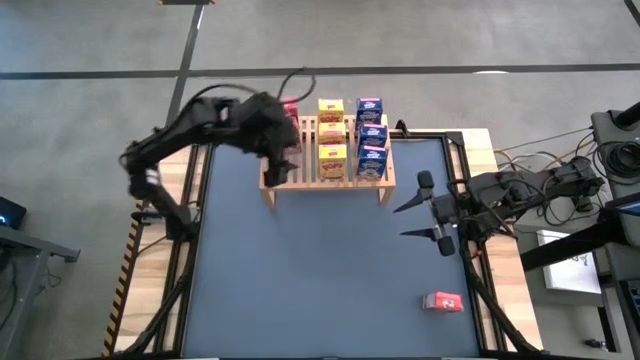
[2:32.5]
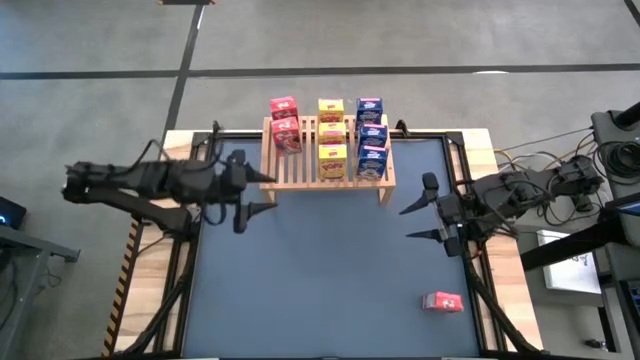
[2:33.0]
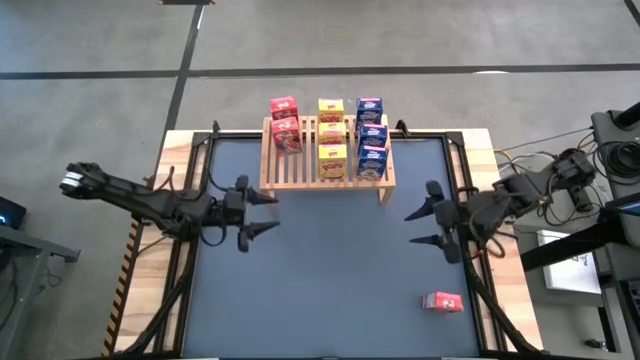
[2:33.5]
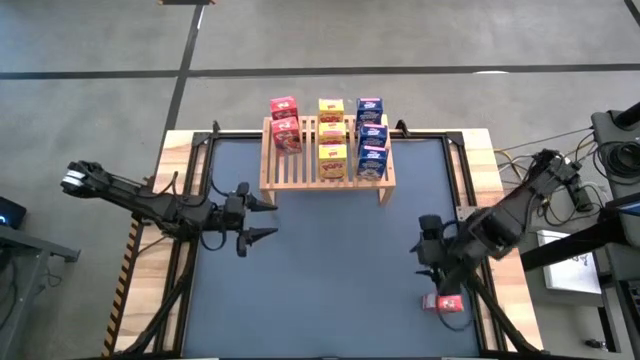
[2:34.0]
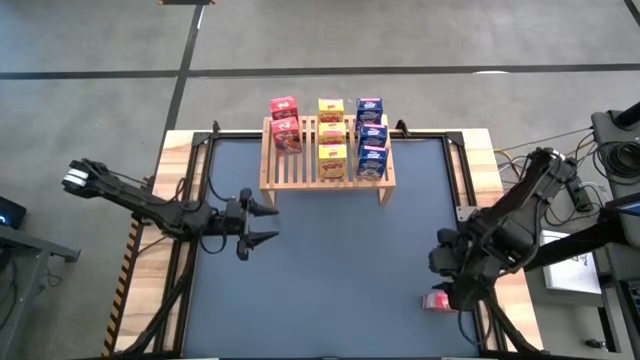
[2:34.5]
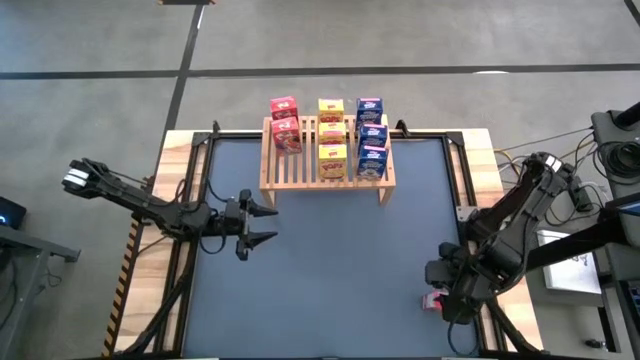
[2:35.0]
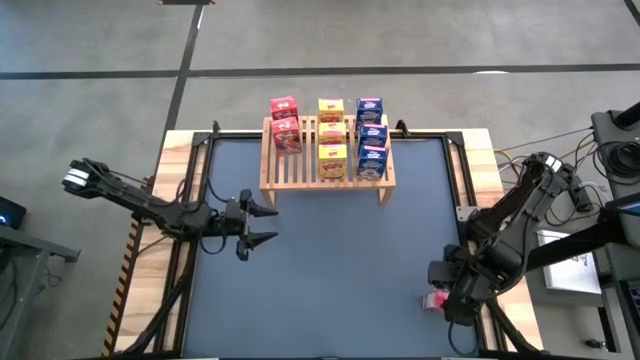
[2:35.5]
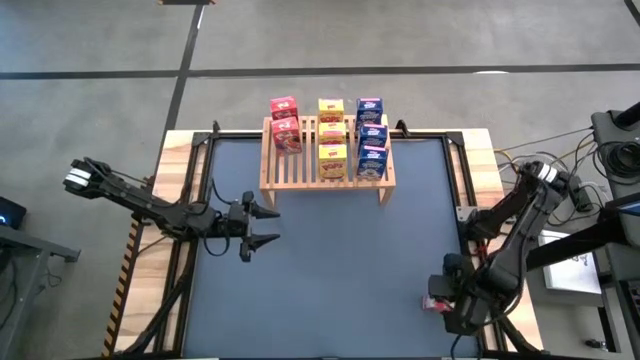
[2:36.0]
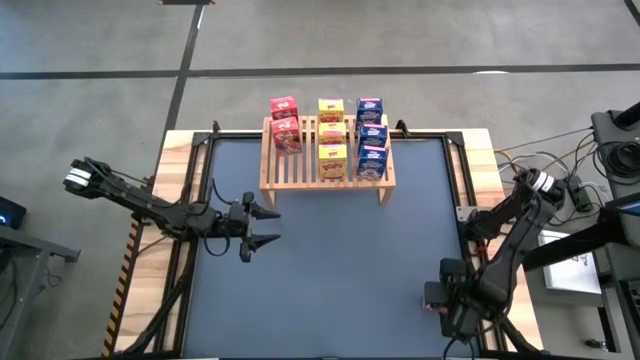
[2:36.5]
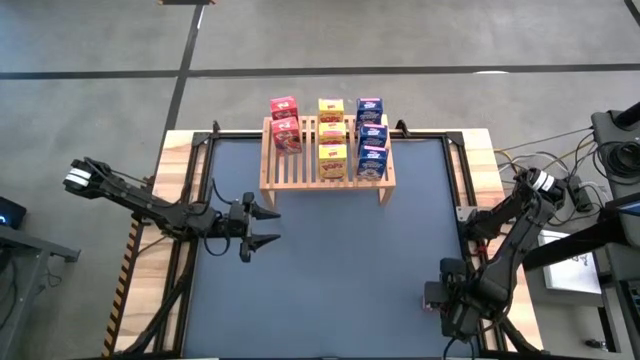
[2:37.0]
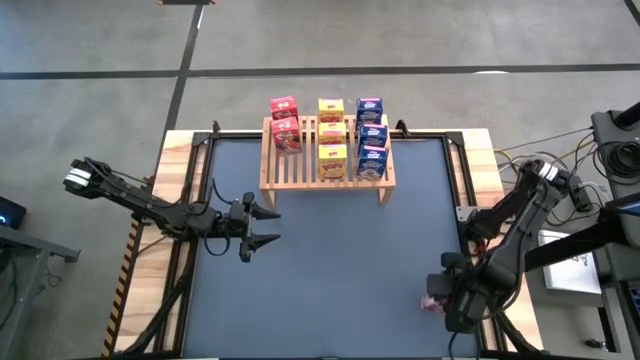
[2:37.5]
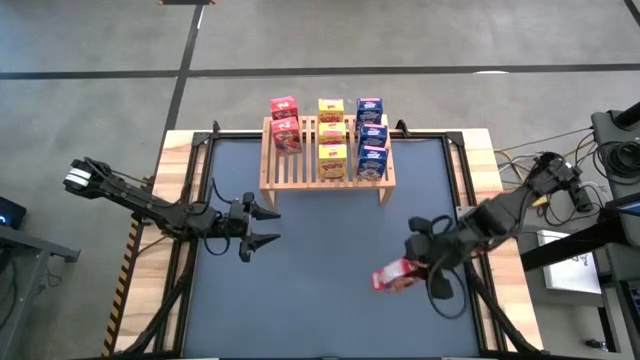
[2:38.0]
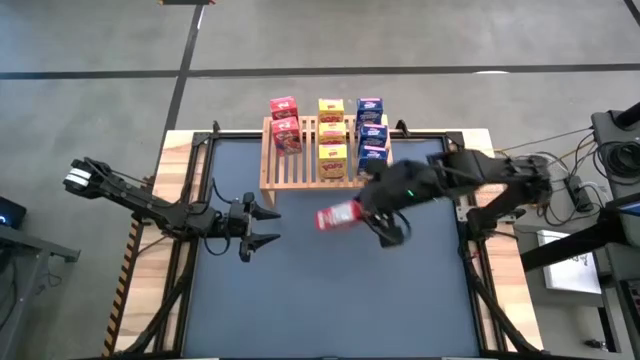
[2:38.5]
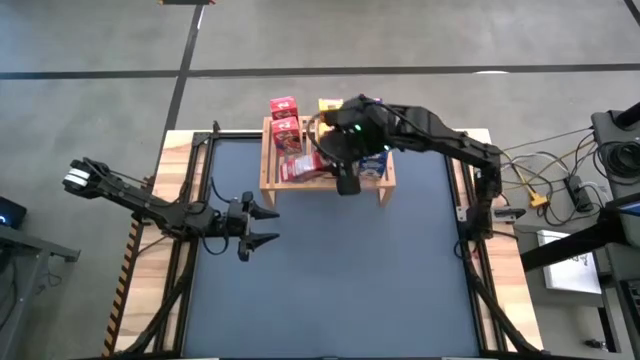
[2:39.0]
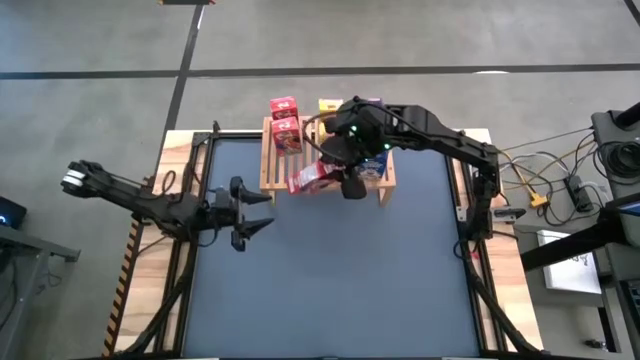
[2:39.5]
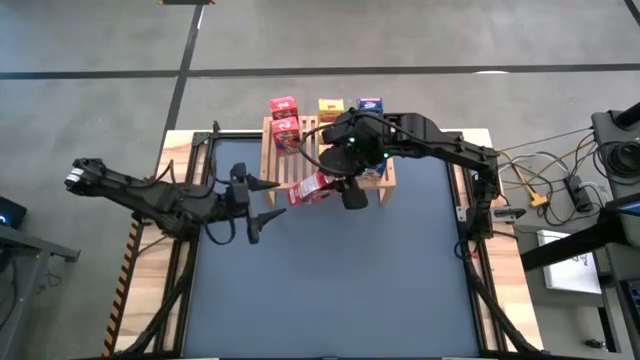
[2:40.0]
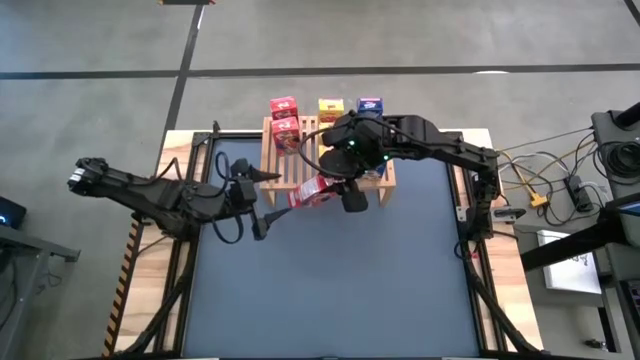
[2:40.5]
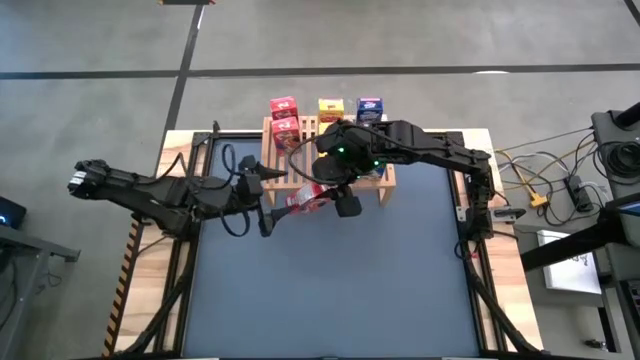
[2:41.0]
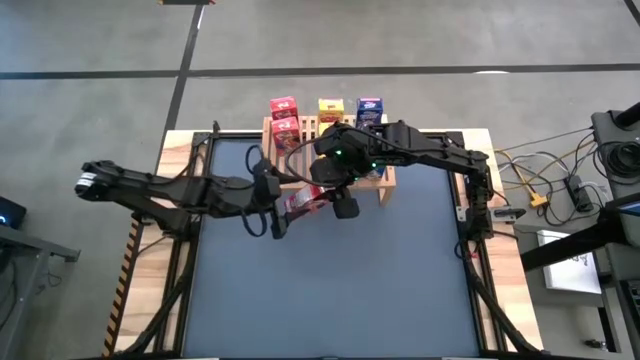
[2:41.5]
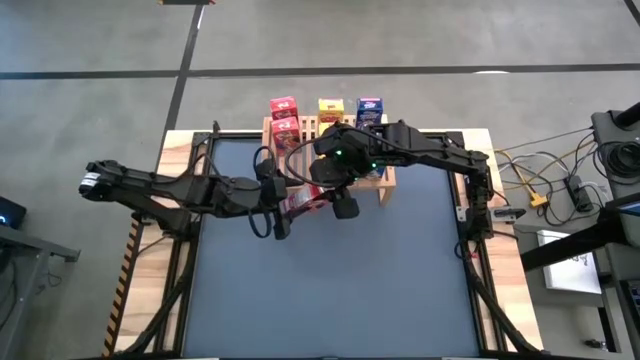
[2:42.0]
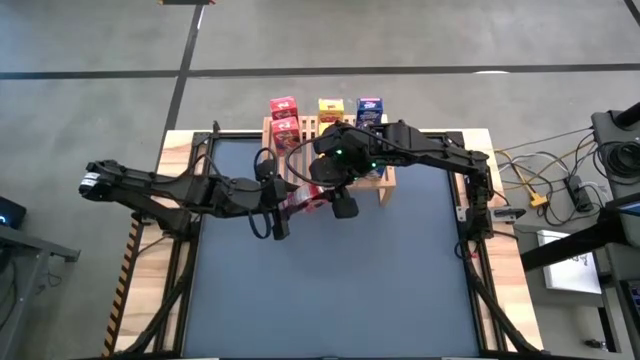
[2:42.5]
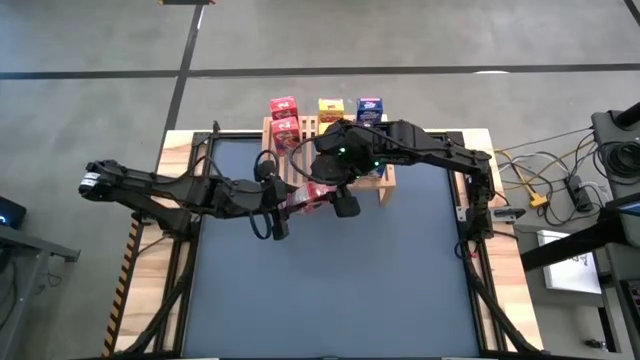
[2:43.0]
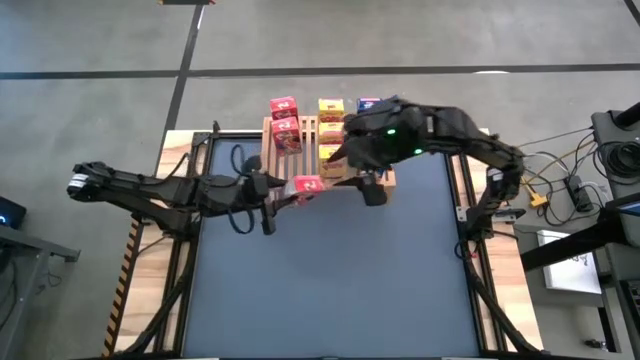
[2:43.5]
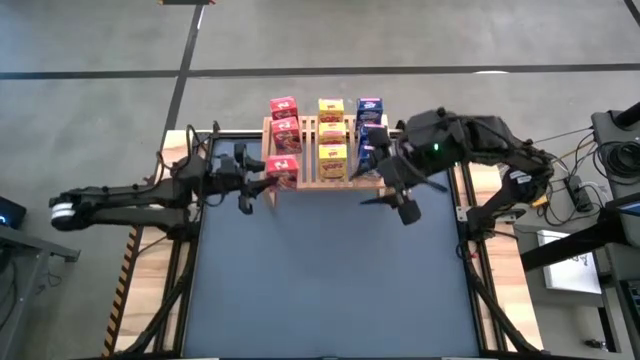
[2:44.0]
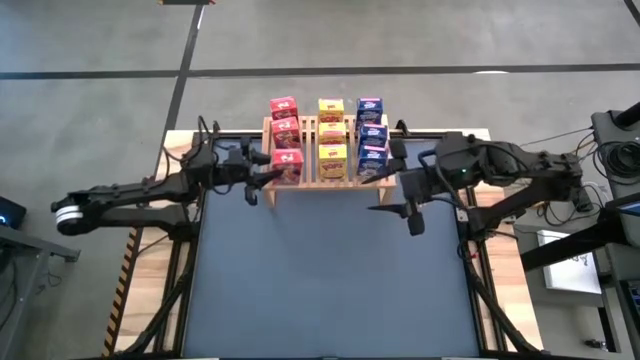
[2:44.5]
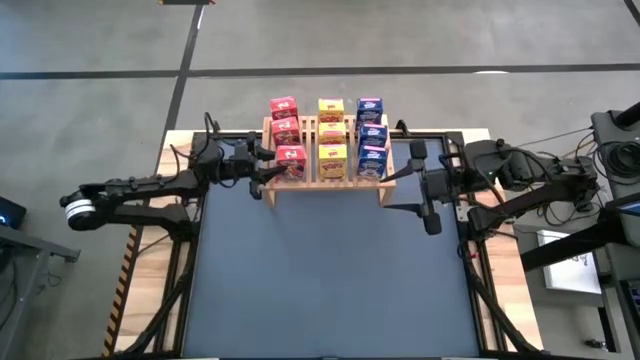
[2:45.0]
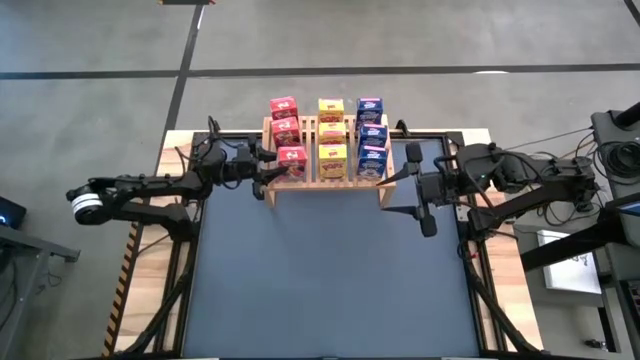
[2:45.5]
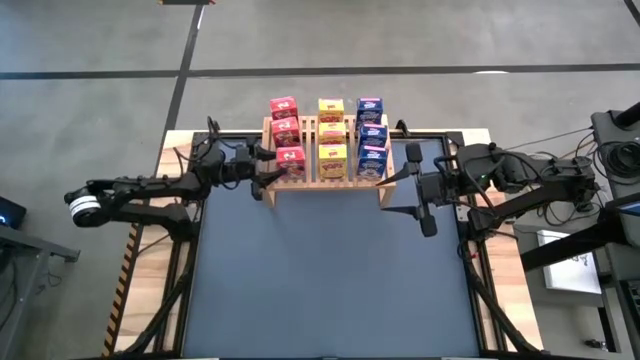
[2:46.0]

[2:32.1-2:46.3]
Task: Stack cereal on shelf
Put the red cereal box on the shelf aligned with the red cereal boxes

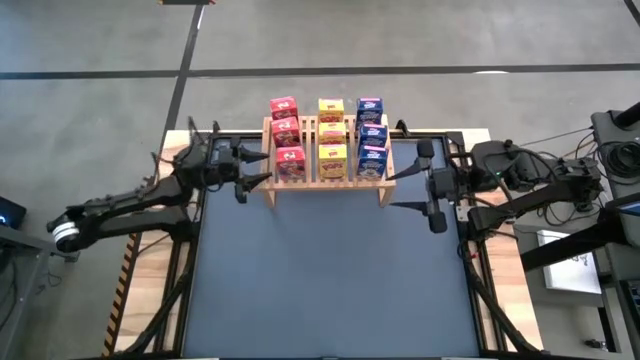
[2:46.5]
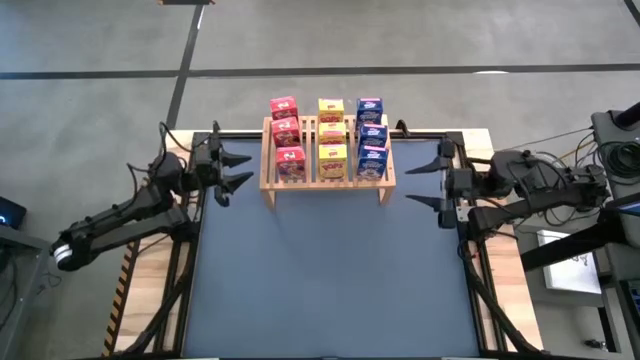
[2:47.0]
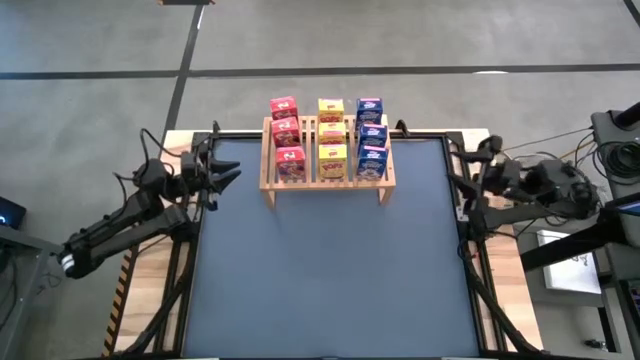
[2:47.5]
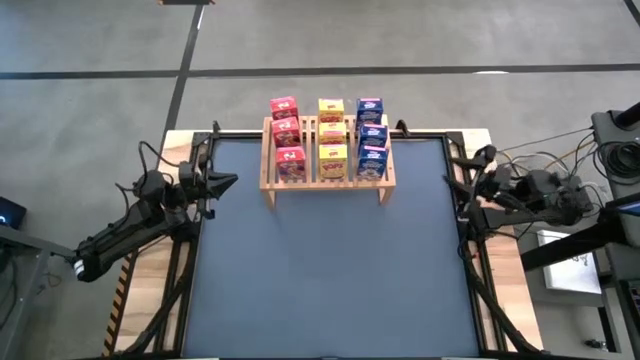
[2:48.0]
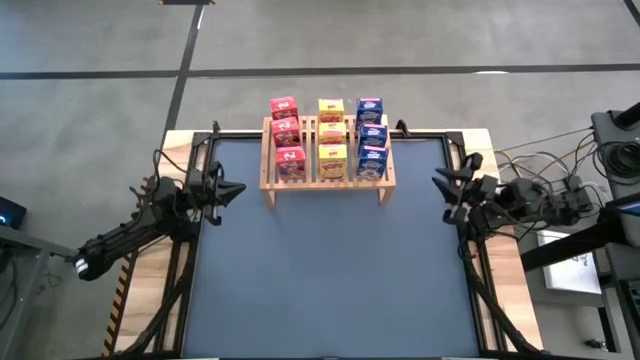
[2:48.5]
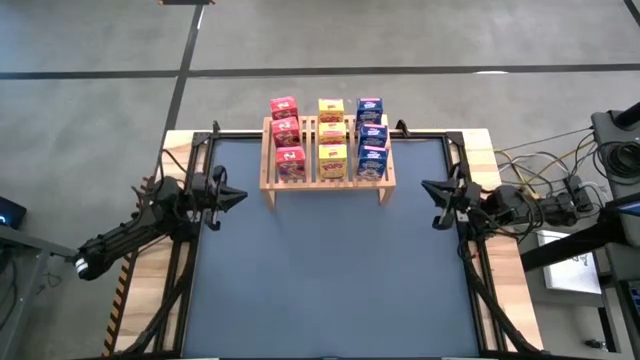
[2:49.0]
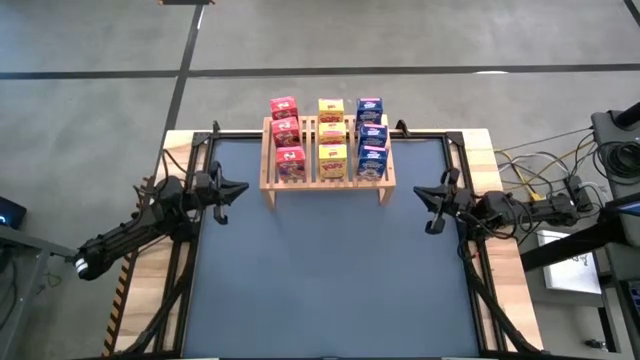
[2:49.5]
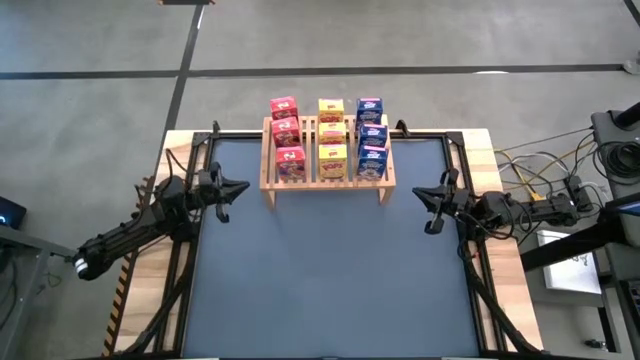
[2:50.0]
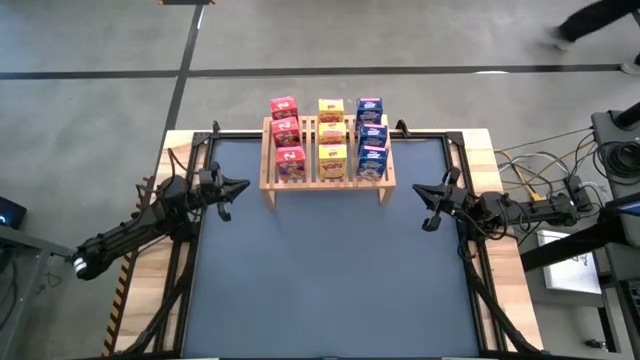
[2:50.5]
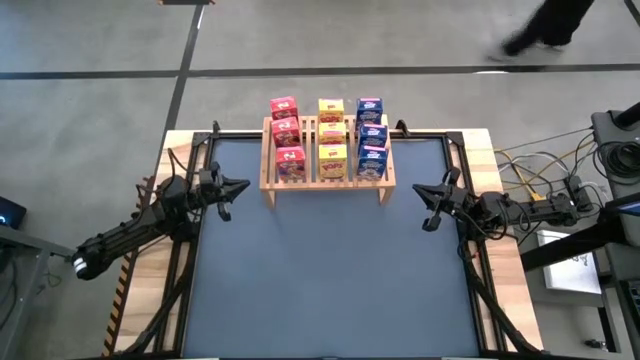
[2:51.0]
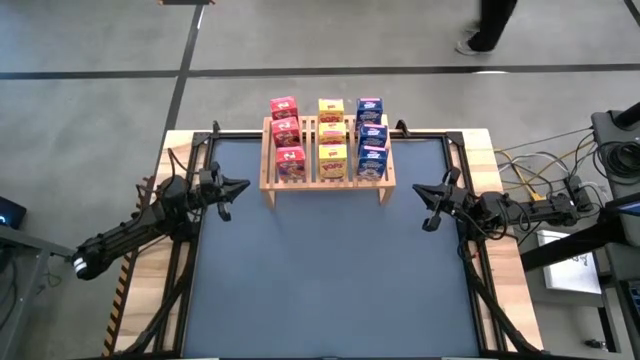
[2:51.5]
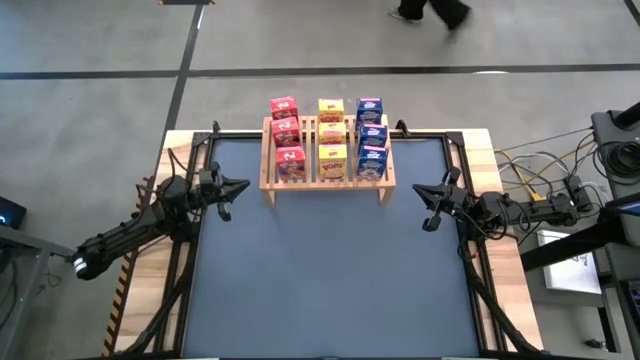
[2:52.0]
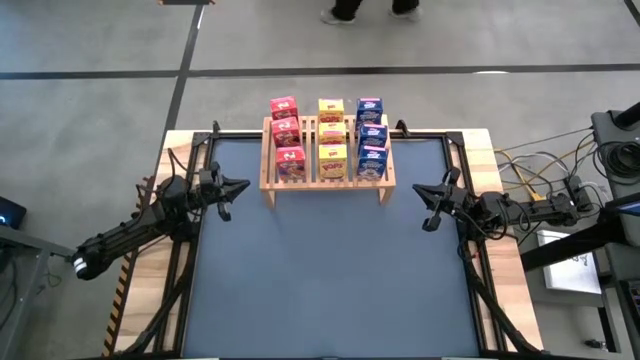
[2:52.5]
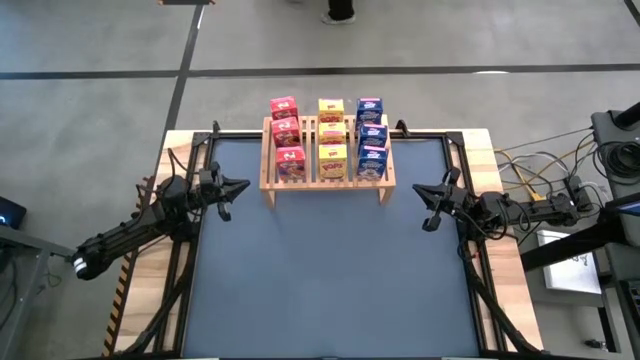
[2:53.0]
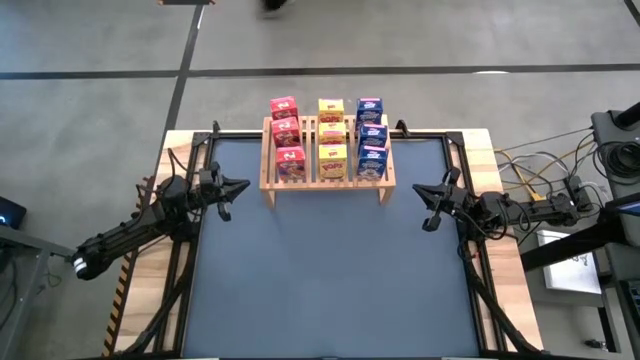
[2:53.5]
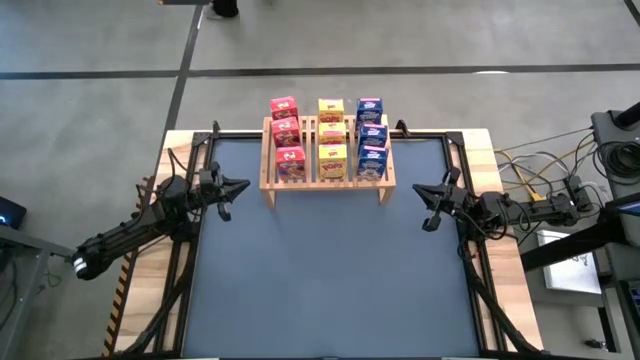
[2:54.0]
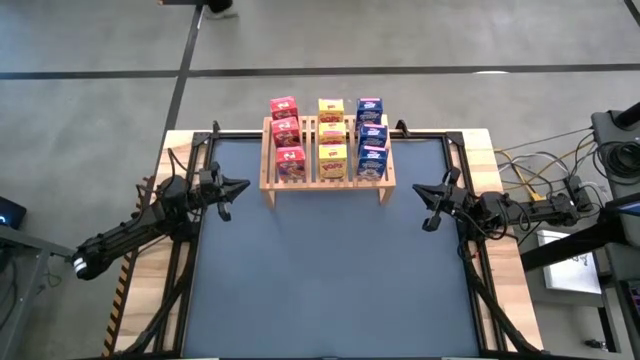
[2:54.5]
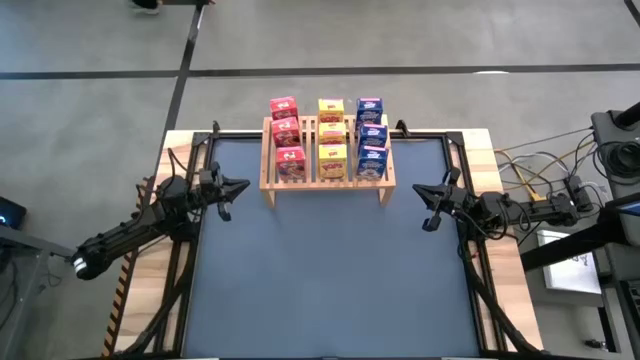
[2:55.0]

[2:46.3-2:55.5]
Return to Home Position
